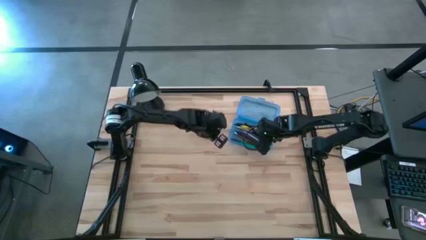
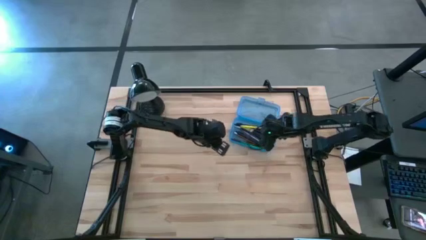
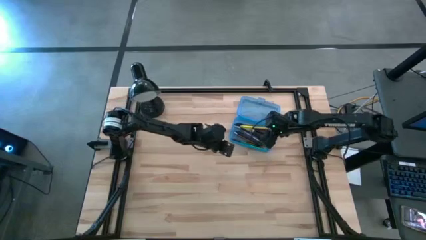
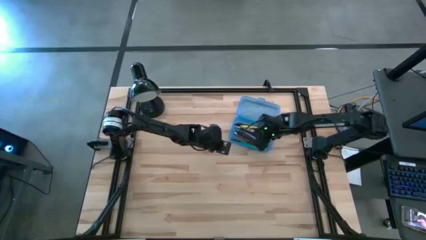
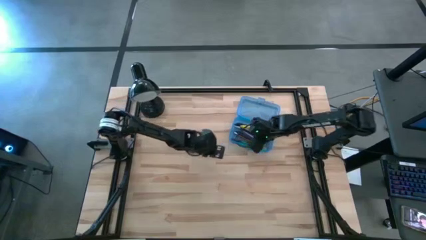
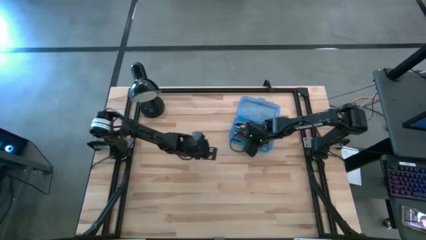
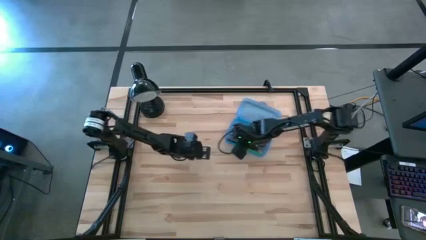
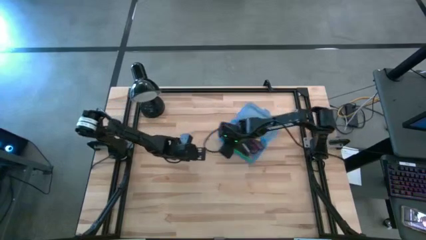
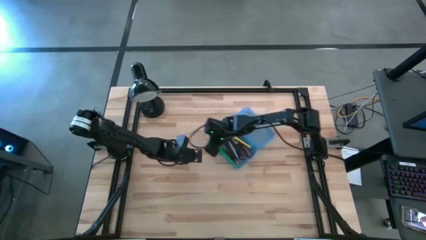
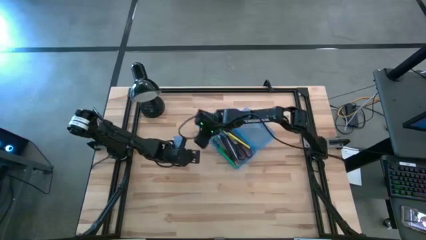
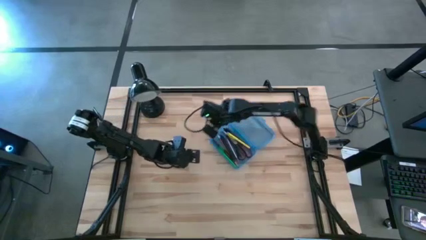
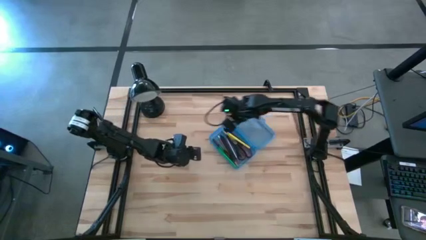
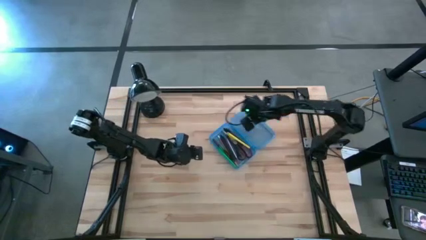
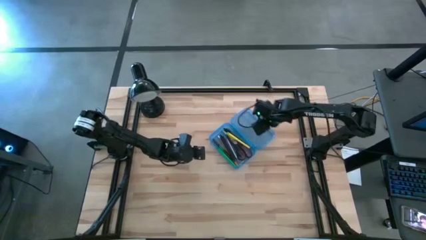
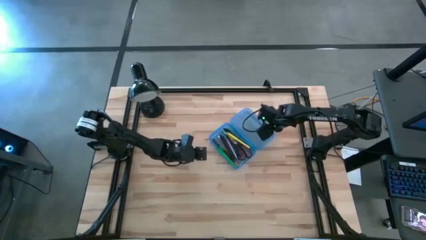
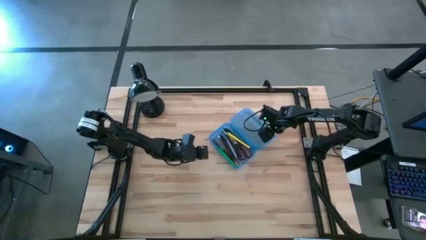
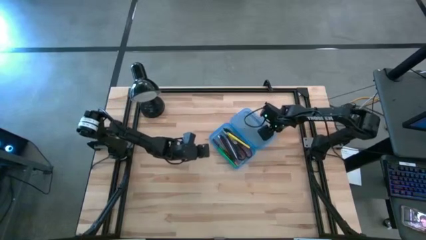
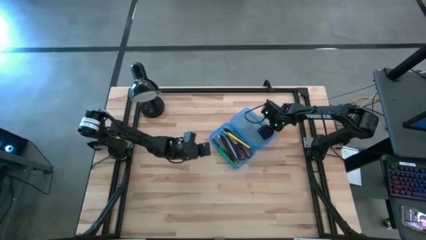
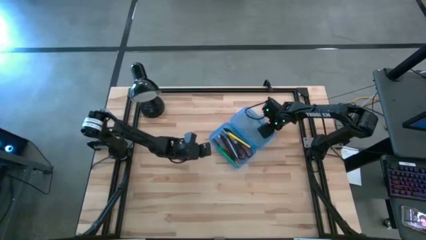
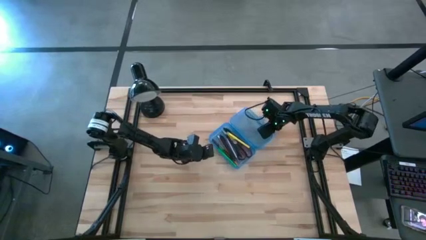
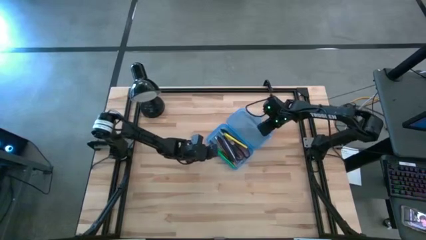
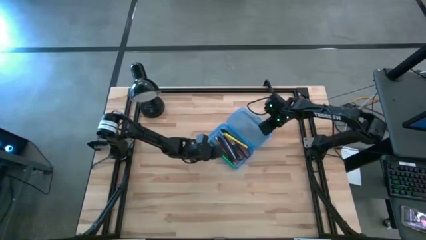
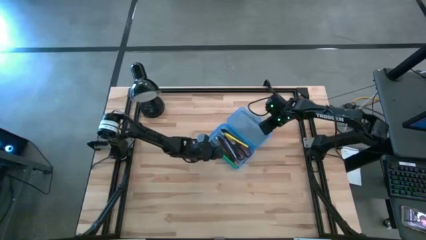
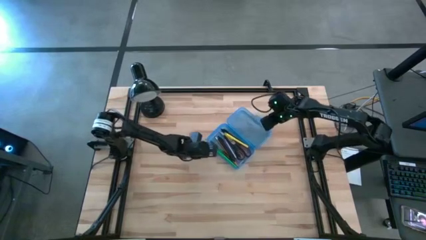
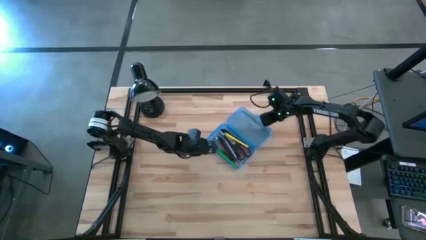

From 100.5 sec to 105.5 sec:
Task: Pick & place school supplies into a supply box
Close the blue supply box

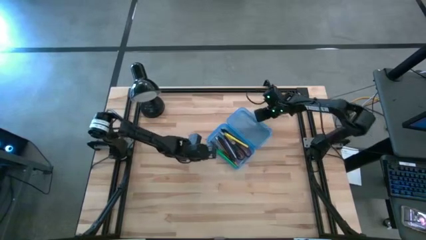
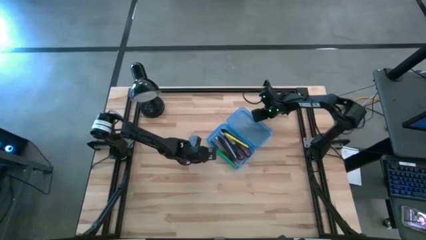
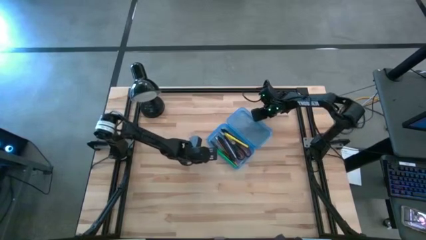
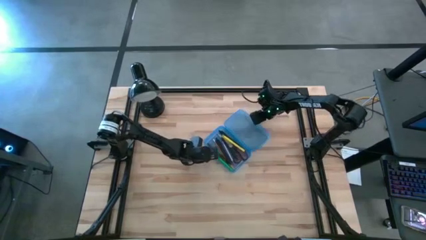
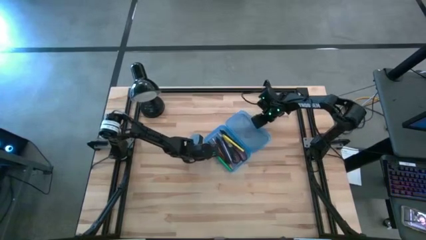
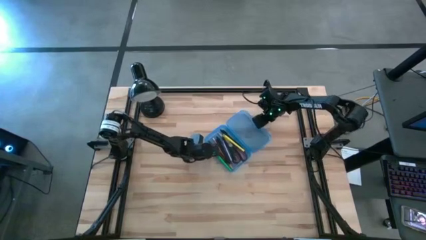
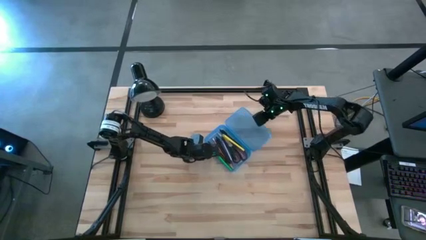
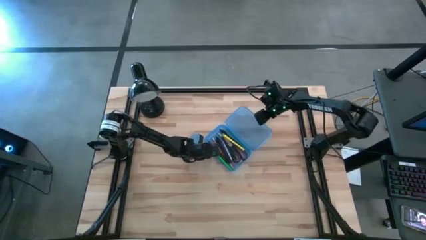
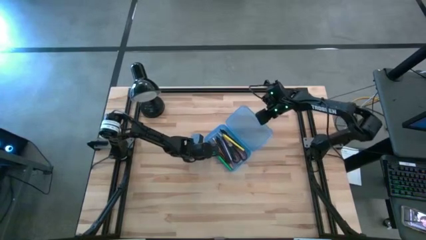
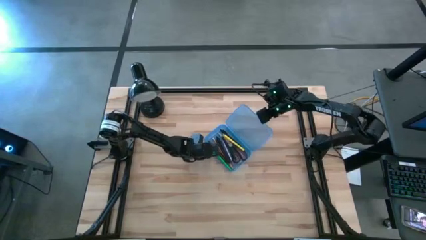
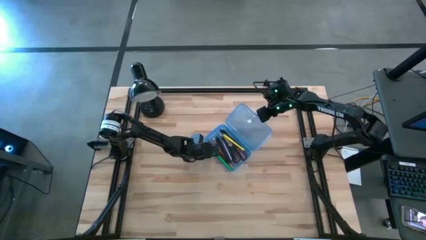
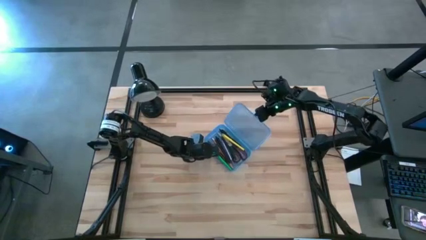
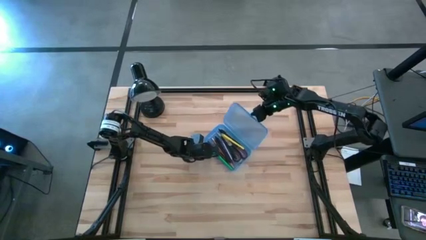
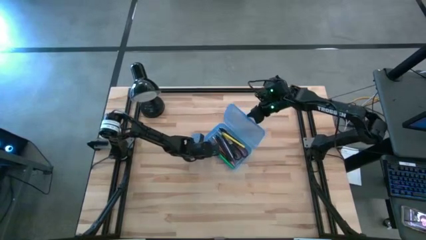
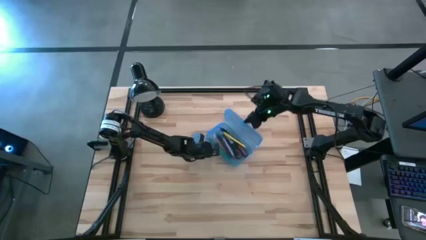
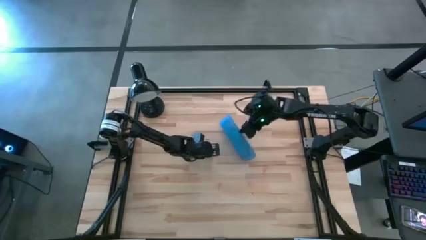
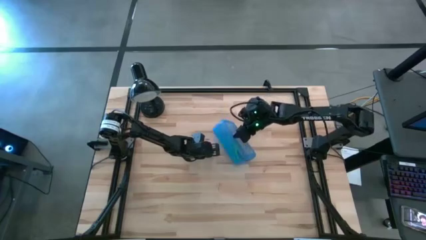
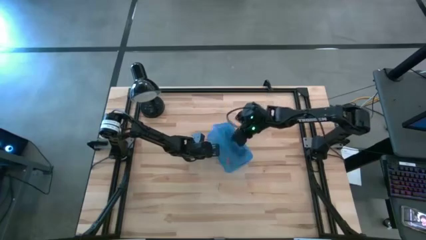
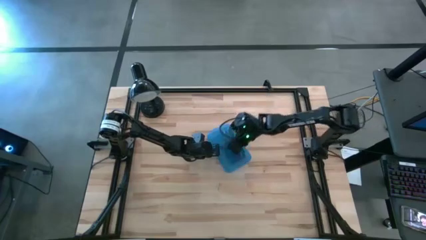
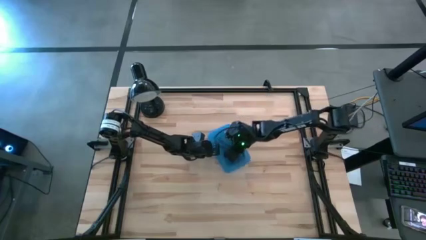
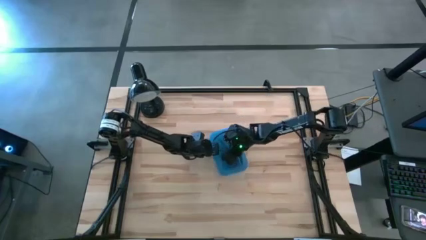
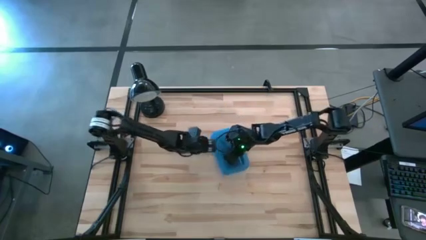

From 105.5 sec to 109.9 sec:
Close the blue supply box

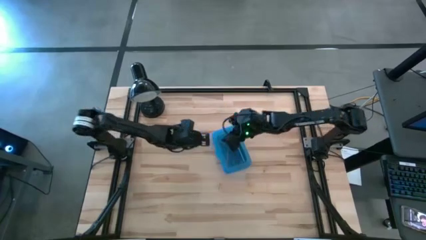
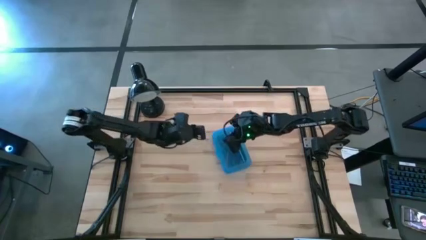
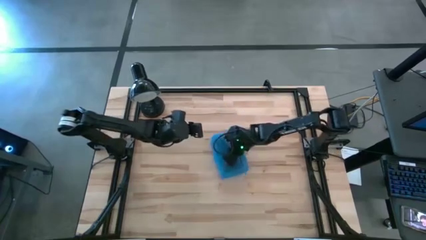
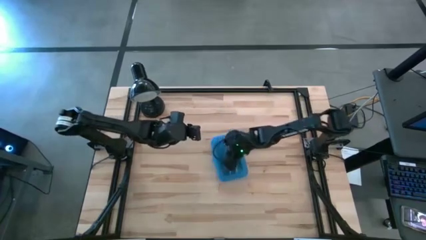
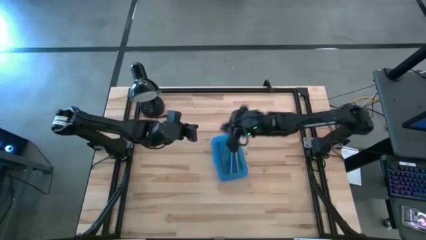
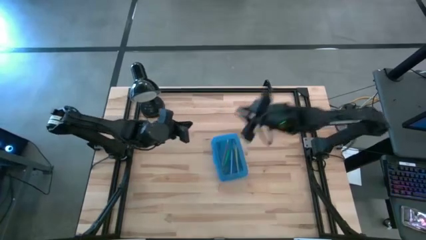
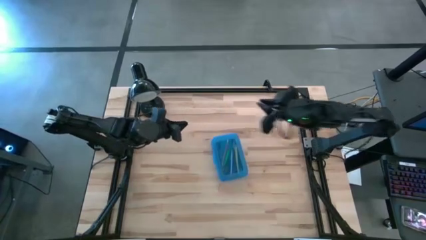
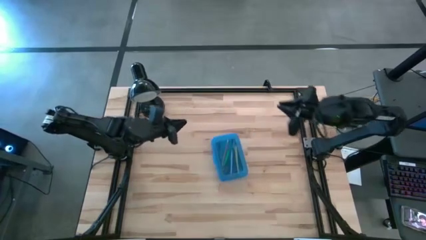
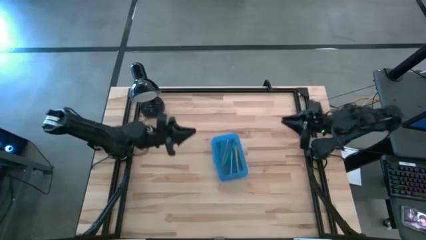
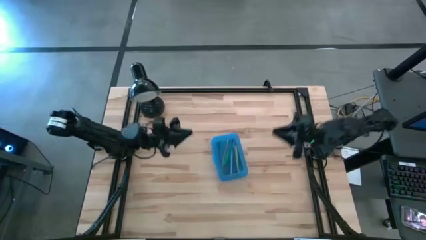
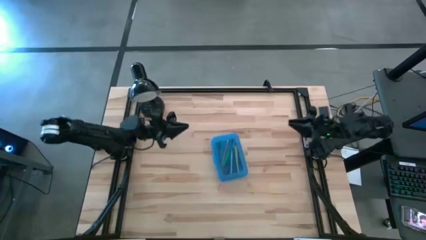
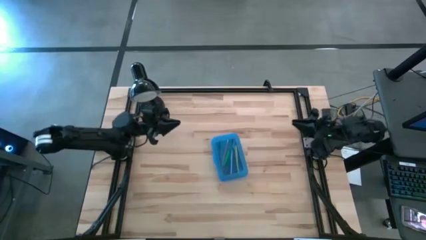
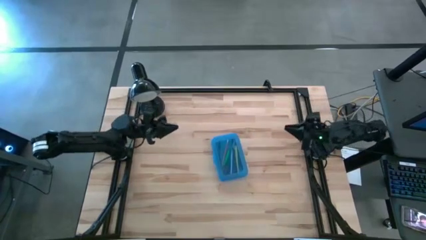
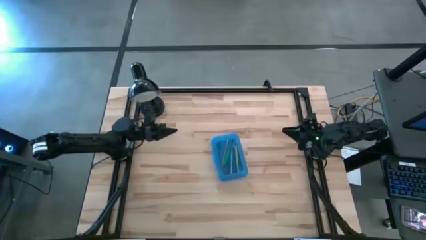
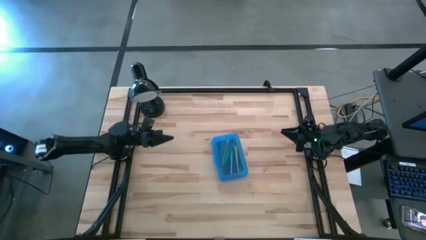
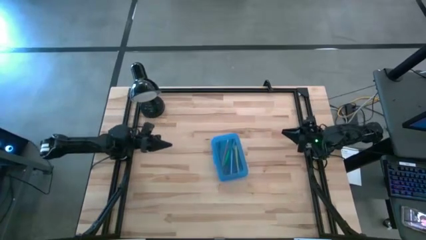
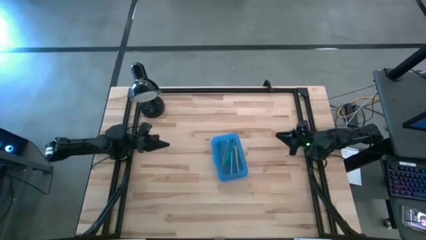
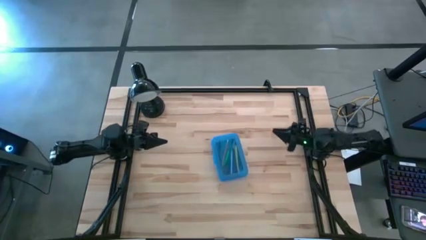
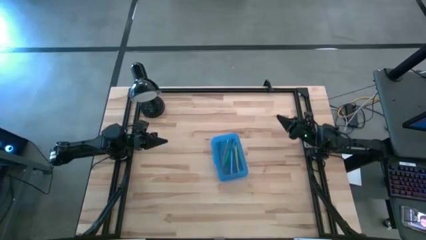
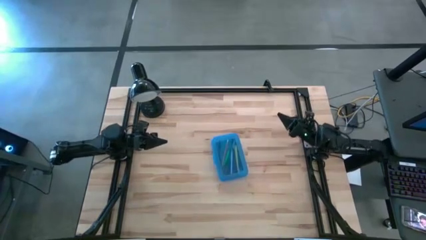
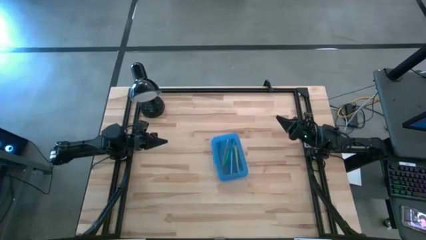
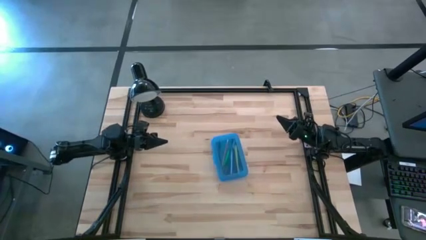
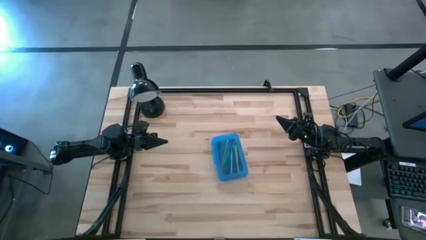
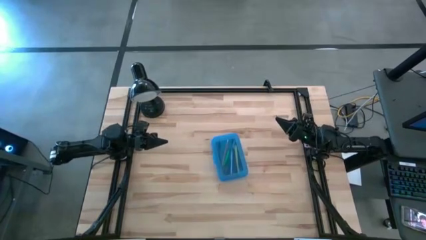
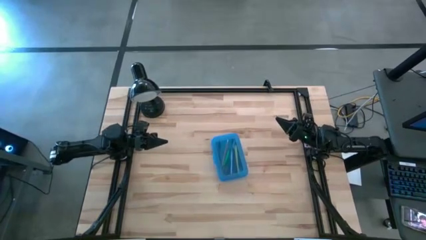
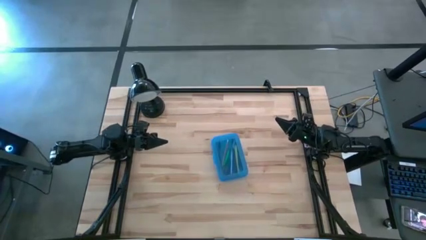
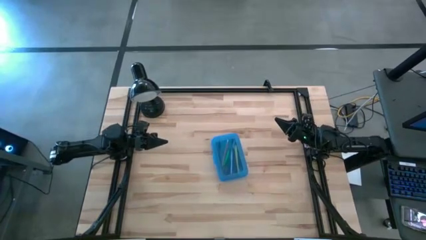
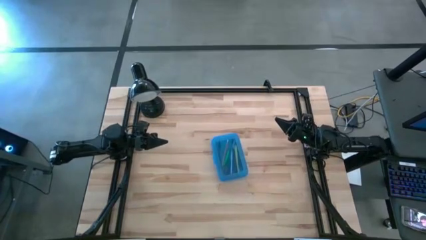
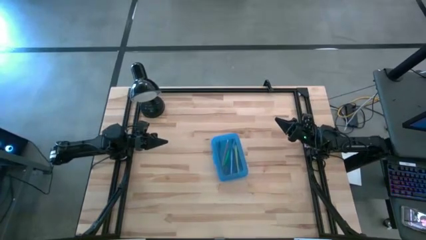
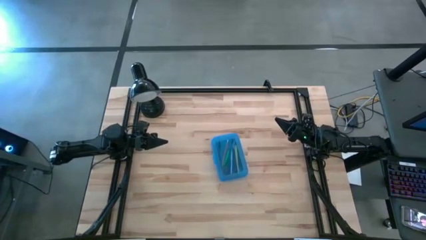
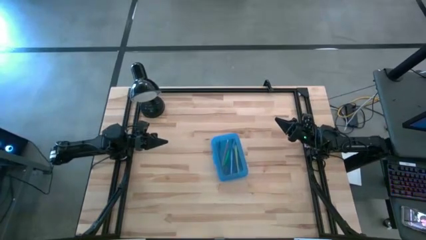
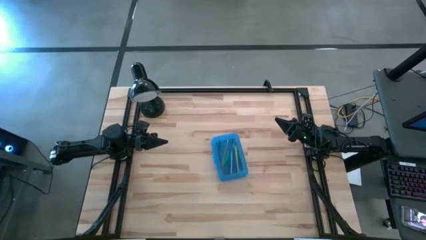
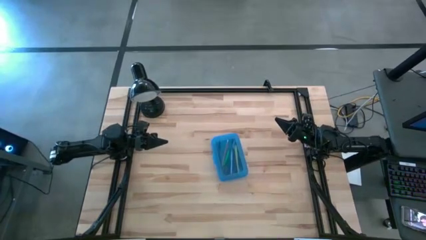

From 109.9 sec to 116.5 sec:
Return to Home Position
